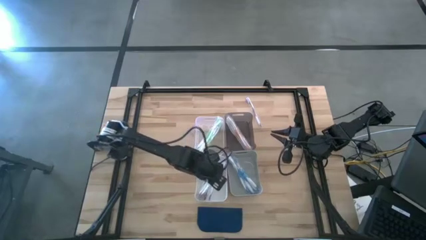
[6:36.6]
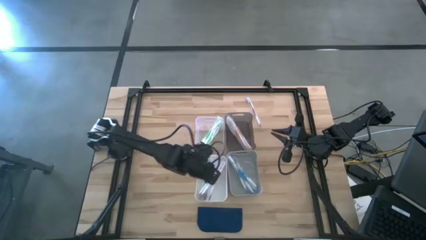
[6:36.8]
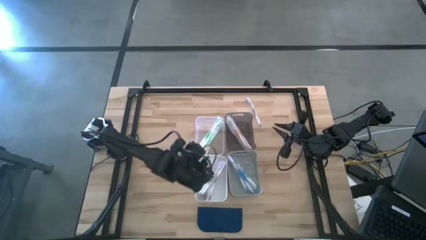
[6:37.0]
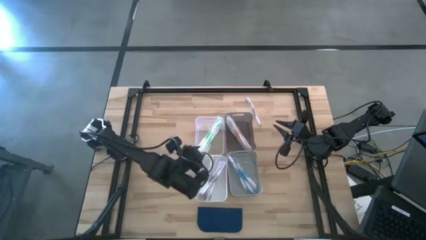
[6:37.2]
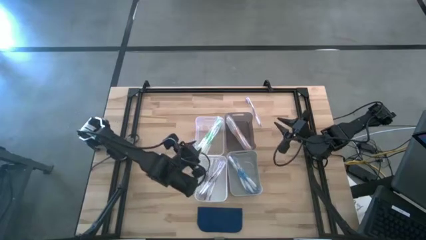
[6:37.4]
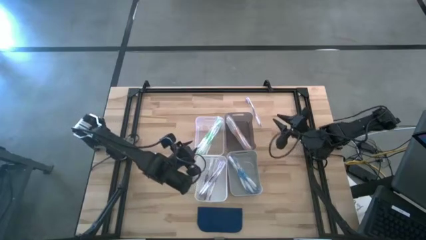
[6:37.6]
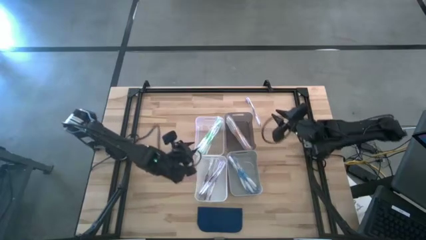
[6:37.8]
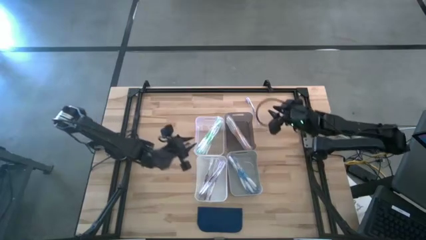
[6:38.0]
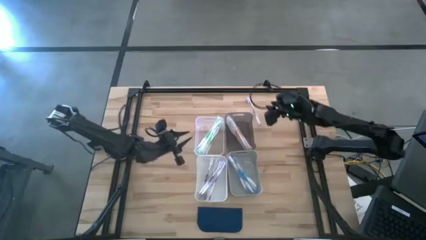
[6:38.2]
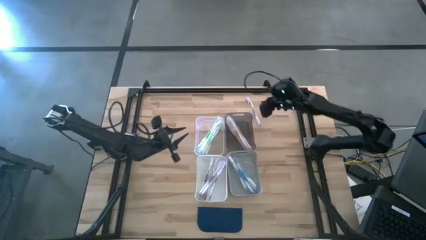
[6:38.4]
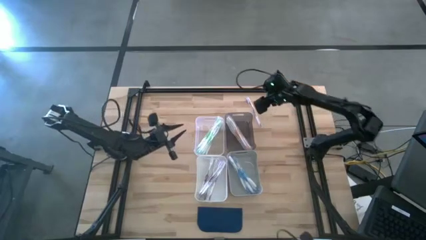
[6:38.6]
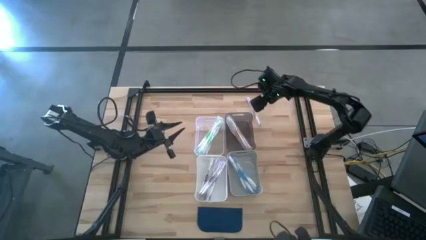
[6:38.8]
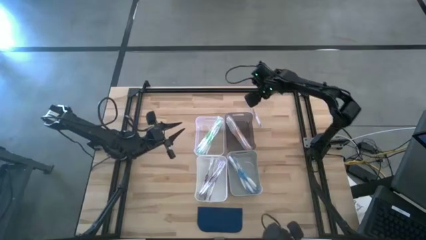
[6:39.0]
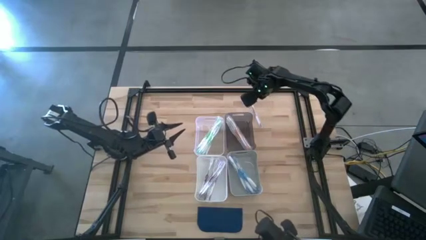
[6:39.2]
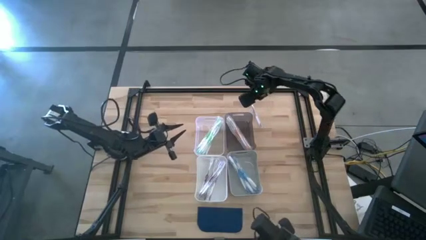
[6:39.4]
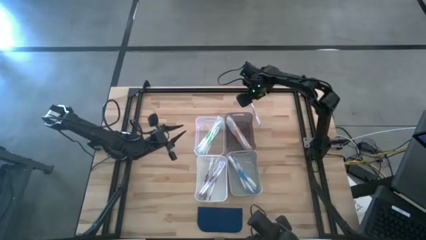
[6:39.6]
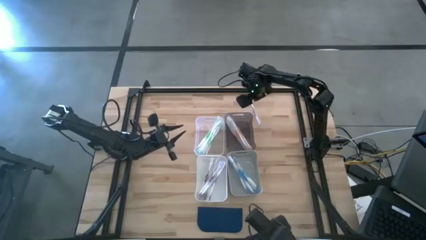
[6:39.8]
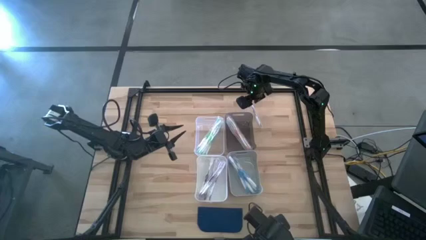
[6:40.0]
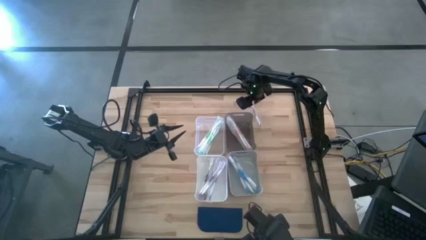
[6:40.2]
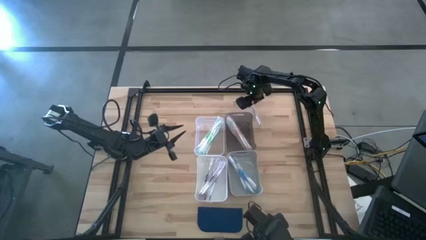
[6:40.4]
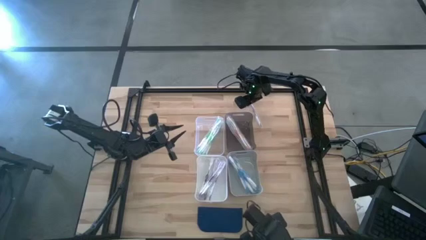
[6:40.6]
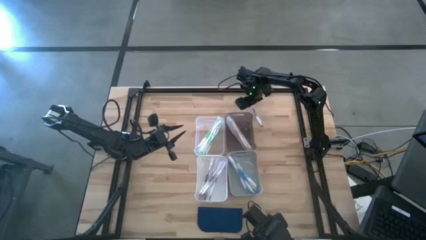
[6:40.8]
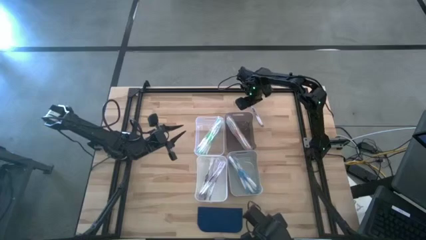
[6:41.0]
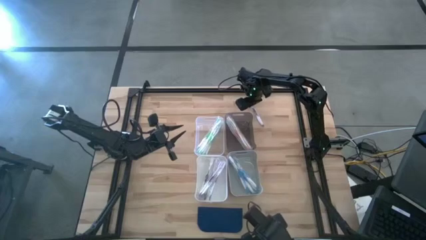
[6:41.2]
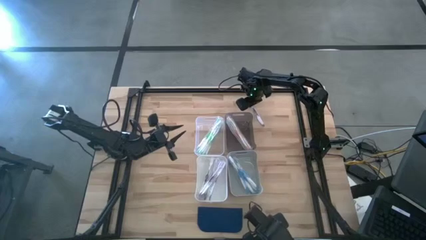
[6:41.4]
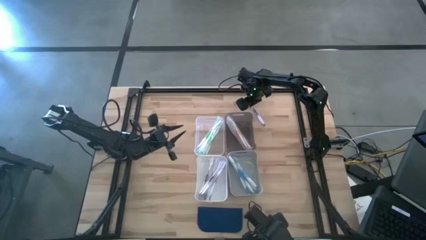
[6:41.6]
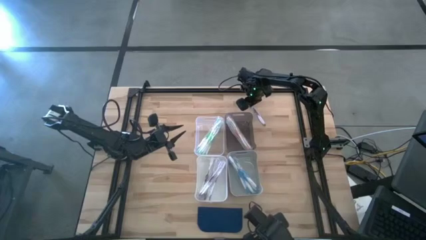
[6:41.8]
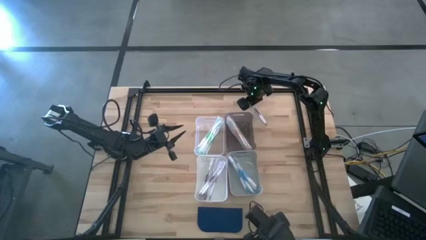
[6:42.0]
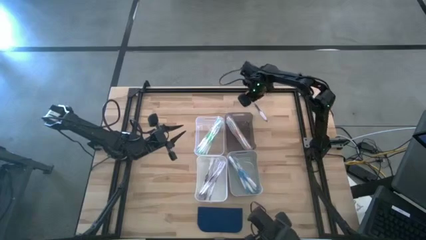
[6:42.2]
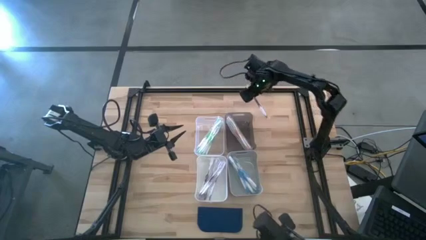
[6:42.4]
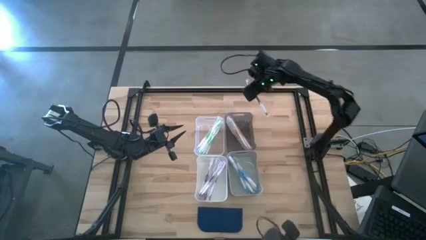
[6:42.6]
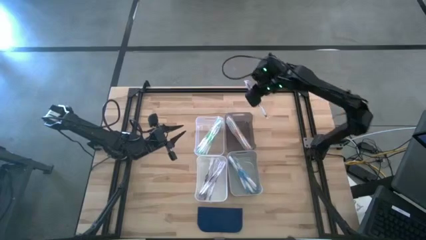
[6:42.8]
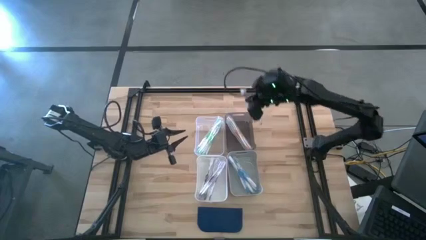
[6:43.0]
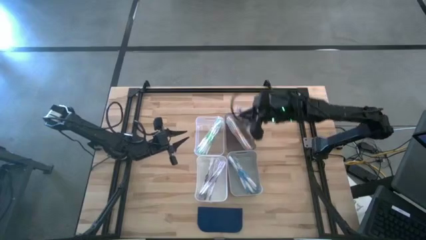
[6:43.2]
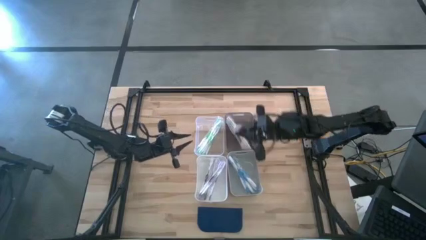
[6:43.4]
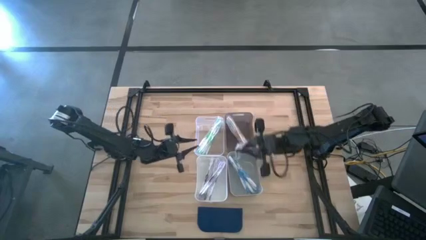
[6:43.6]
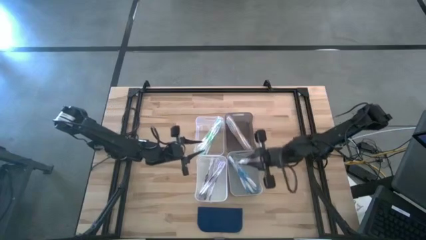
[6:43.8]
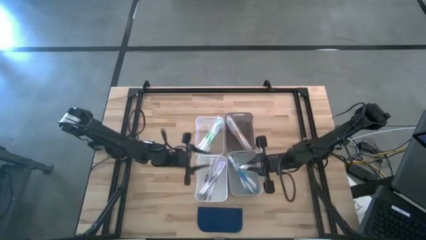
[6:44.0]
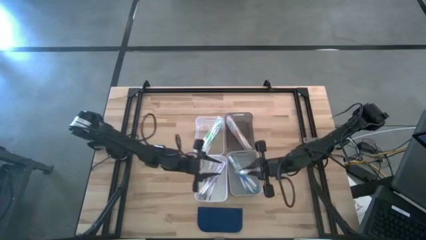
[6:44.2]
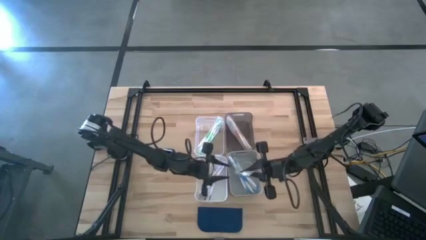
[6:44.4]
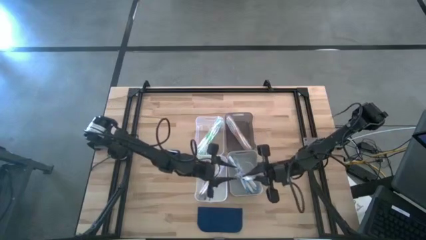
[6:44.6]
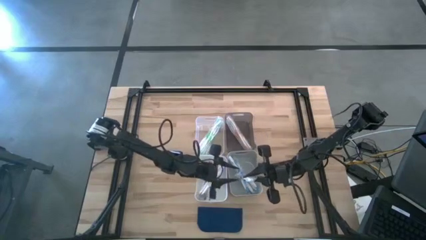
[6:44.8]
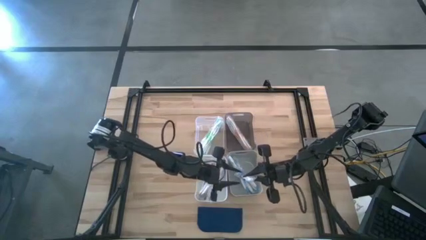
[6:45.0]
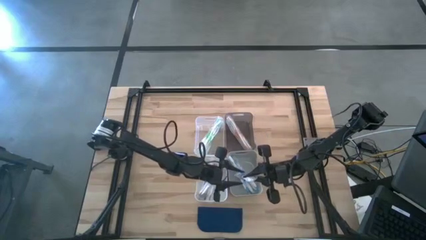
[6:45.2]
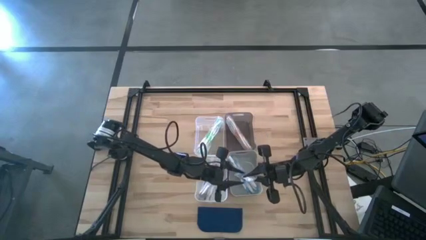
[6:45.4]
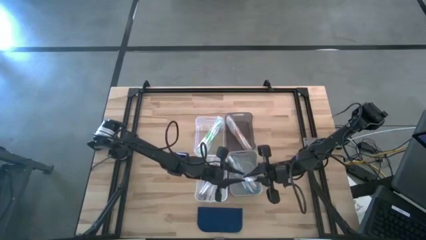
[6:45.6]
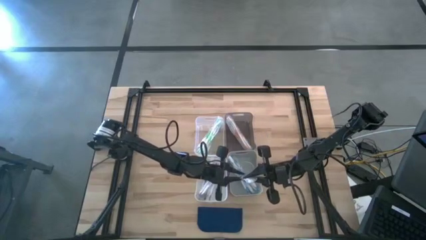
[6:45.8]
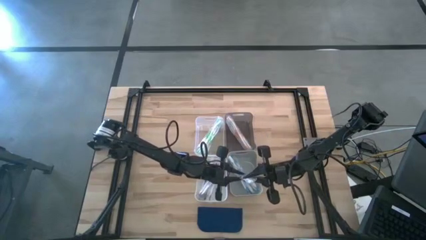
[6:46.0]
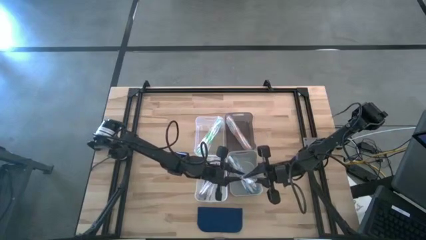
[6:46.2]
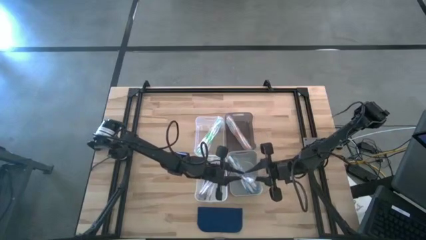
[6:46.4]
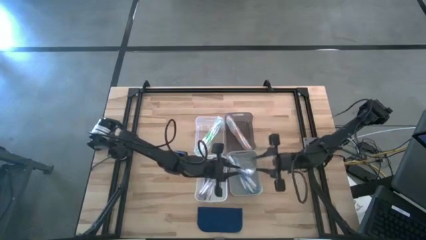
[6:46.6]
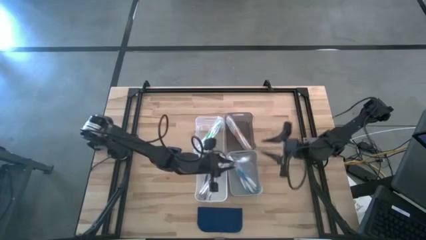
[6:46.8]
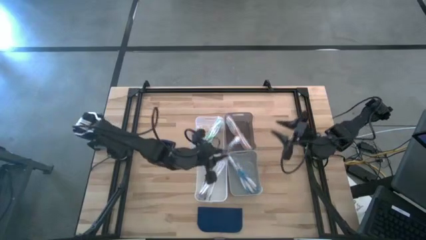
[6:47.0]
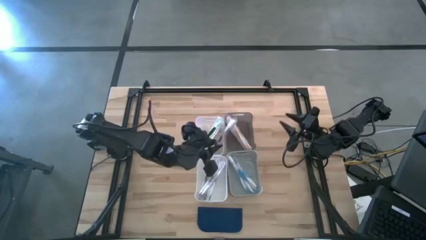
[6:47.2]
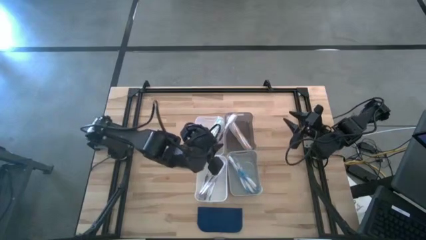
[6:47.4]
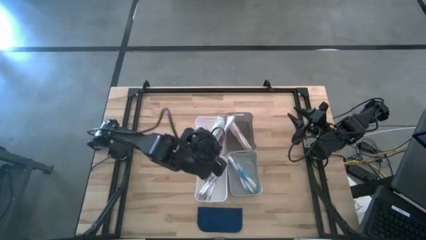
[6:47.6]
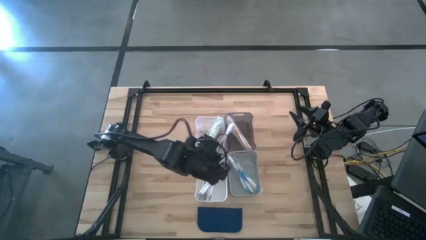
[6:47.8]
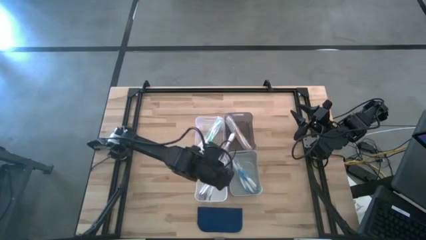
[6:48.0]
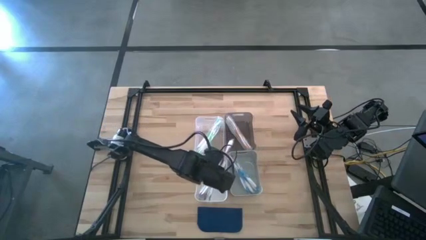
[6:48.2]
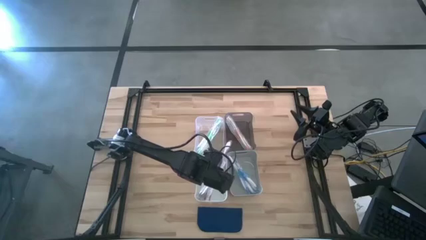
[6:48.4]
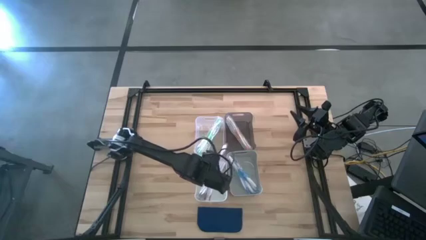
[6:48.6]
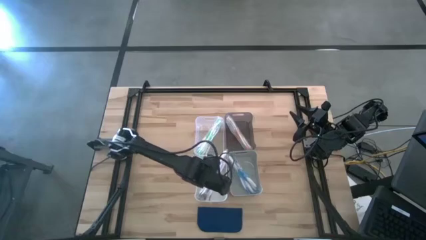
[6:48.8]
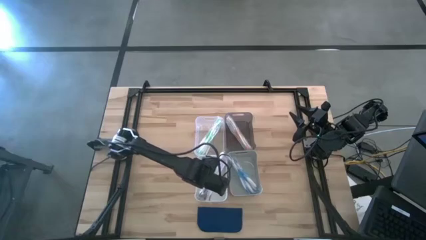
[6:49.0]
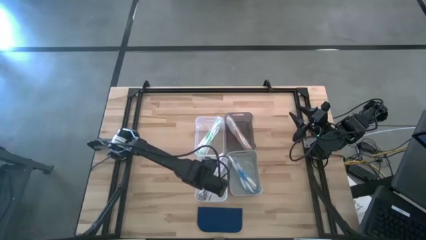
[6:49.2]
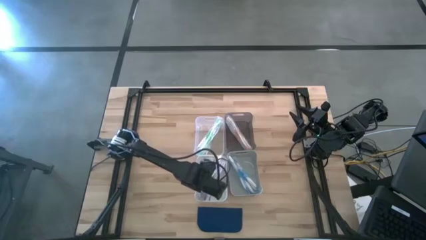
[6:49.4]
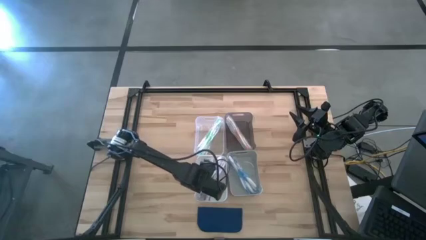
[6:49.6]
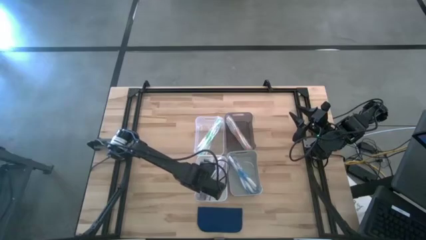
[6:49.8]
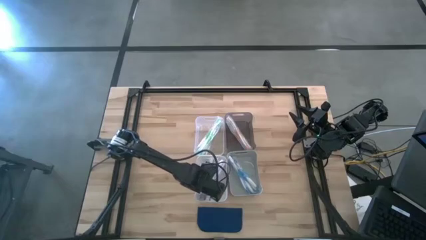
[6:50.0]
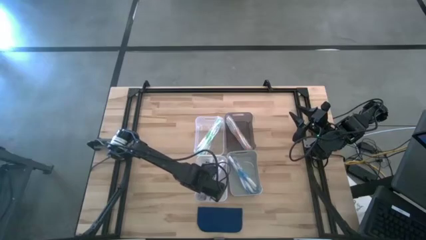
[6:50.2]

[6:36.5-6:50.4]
Task: Pick & Place Toothbrushes
Put the violet toothbrush into the white bin

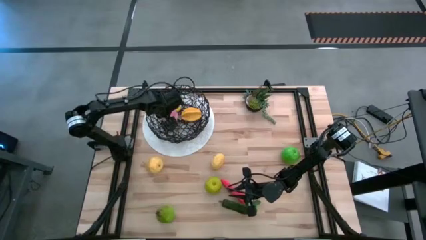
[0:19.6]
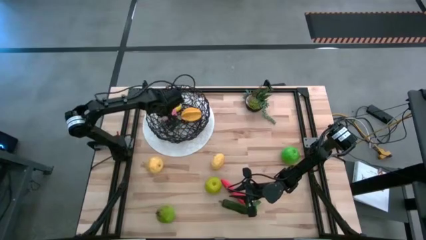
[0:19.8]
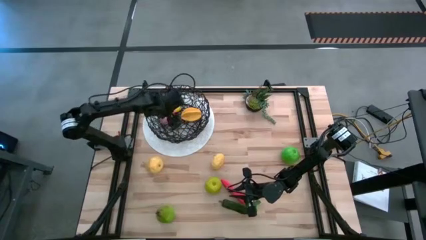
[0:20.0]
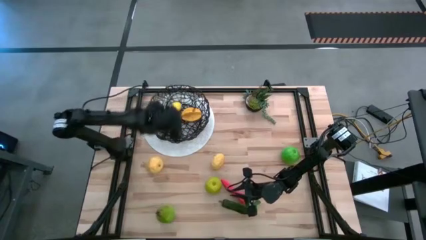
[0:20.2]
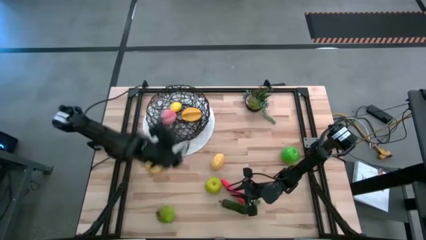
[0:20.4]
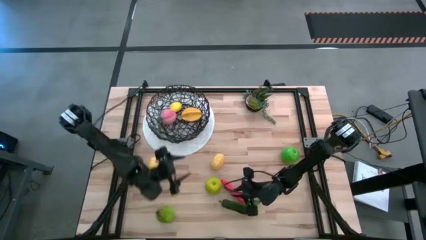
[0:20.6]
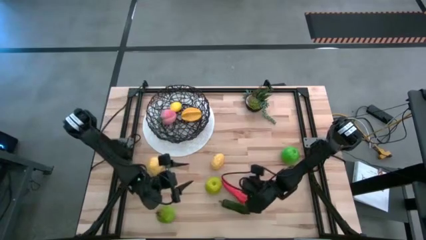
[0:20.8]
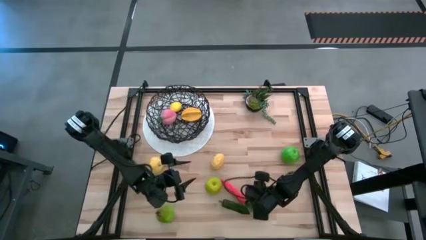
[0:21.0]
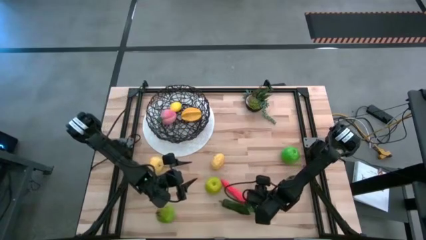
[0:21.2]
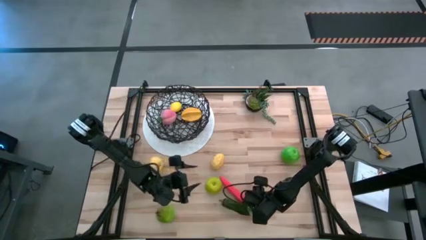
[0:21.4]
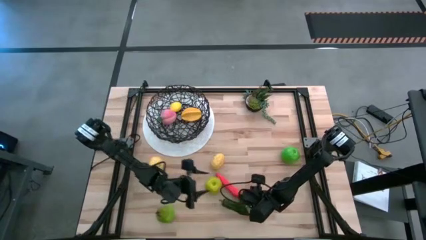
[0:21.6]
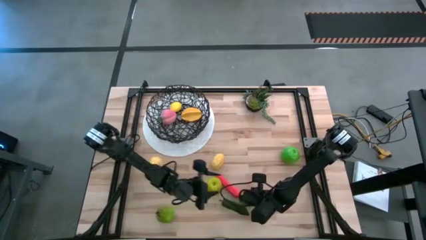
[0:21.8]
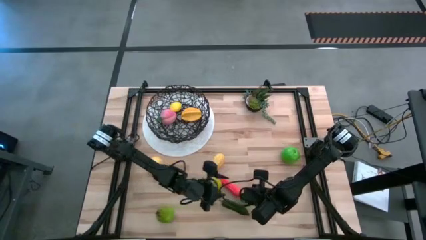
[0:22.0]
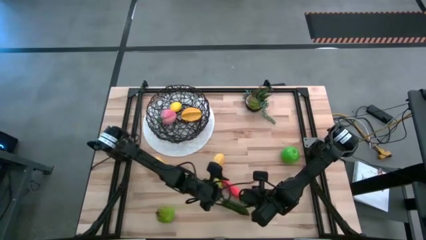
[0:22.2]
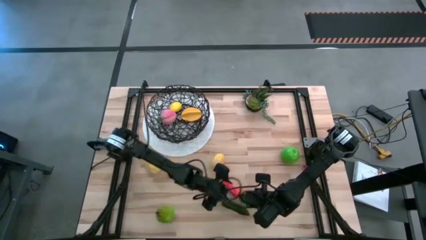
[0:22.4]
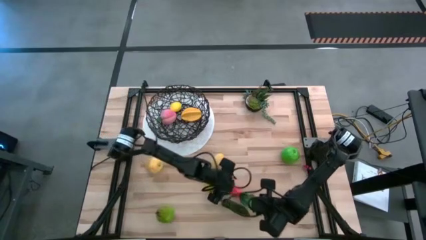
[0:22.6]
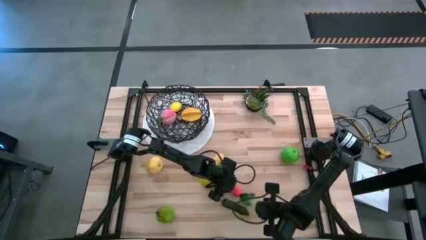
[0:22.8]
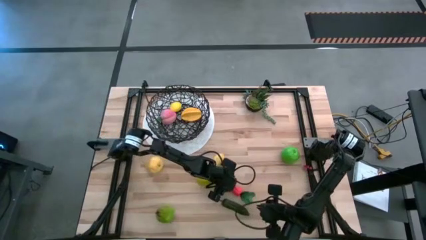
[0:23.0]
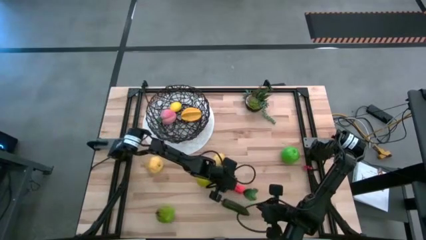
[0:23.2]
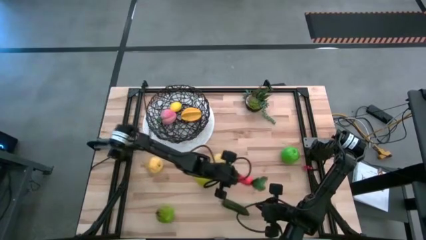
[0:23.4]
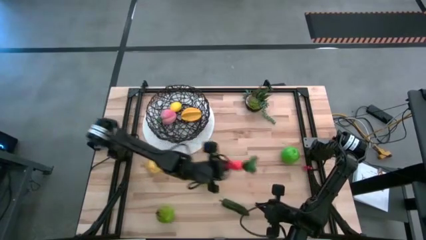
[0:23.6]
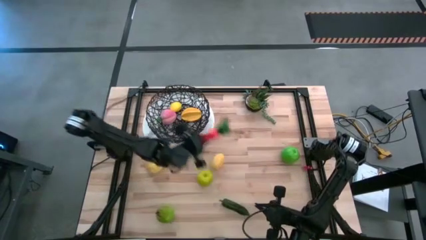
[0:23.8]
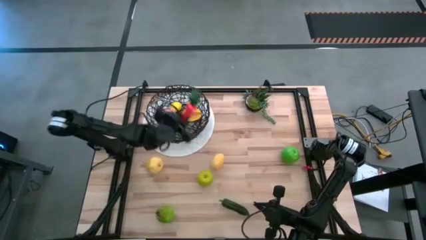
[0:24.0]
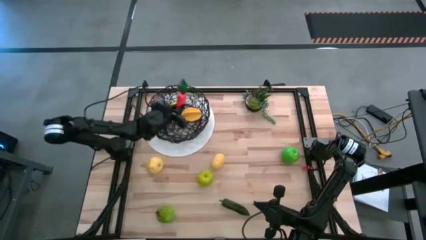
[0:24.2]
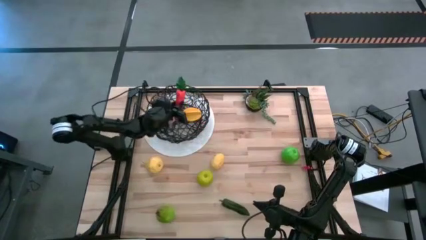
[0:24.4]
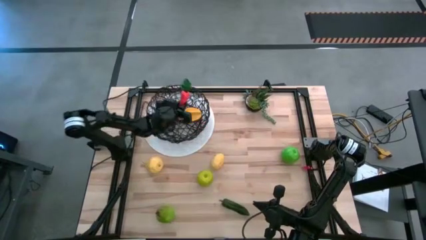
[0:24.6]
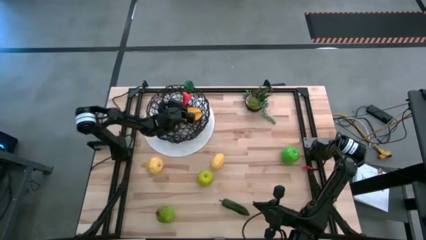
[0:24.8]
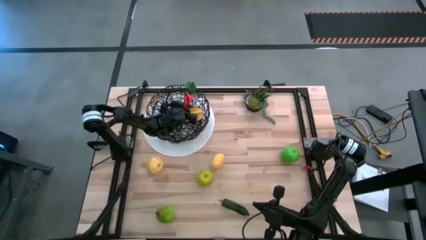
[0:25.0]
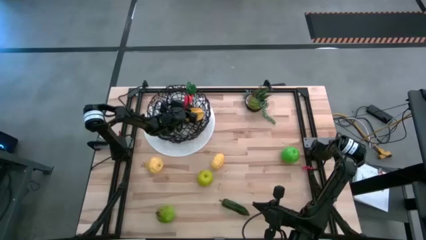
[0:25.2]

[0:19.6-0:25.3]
Task: Build produce basket
Put the orange carrot into the wire basket
